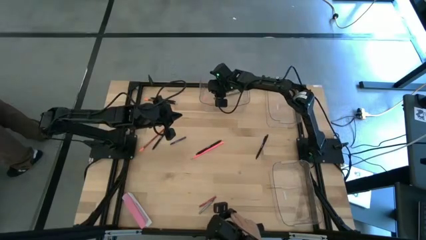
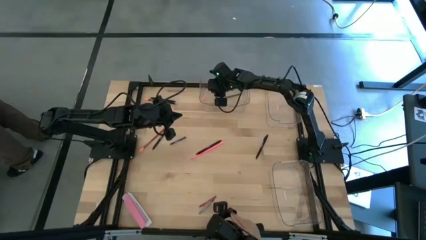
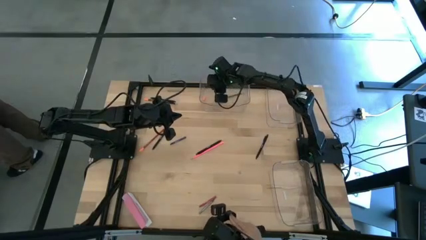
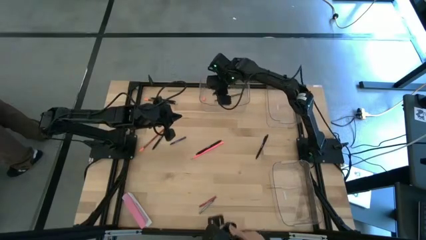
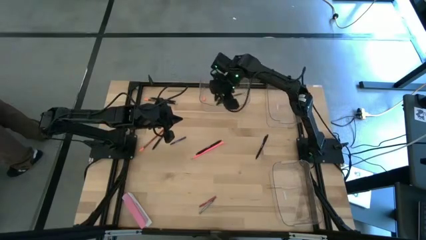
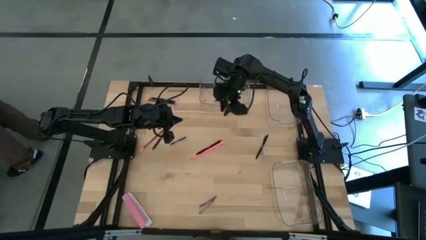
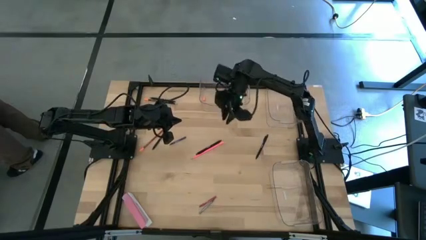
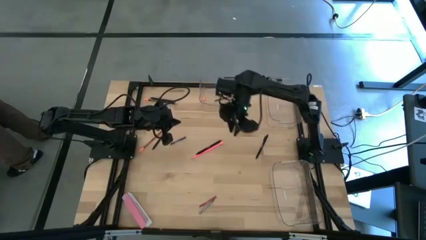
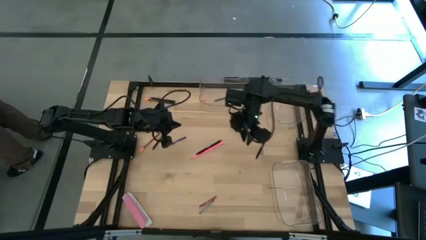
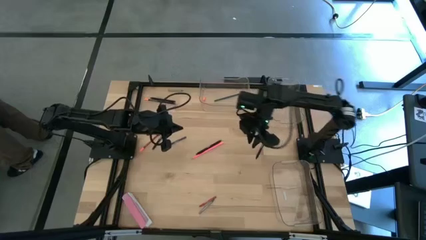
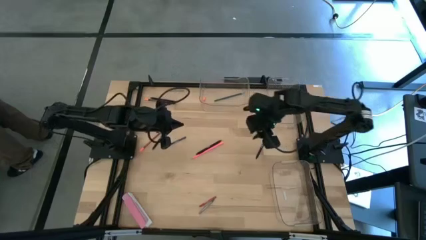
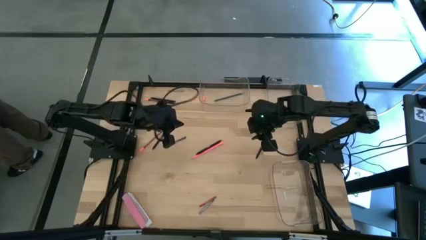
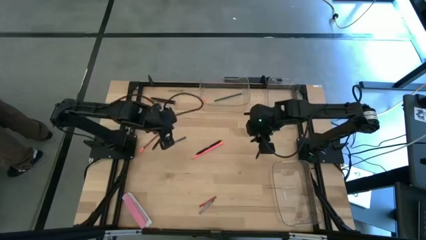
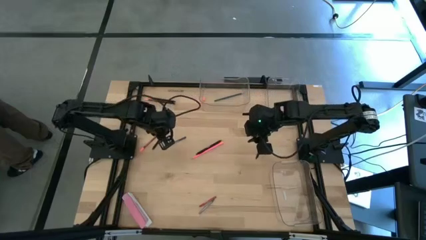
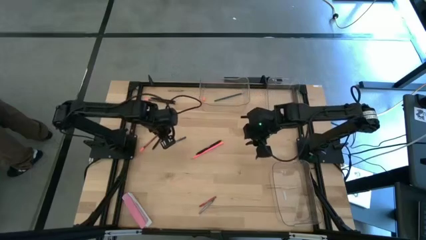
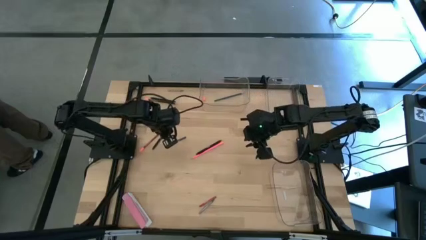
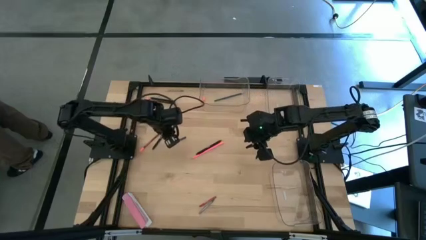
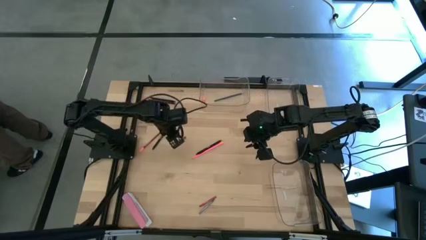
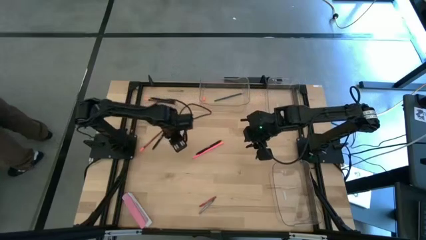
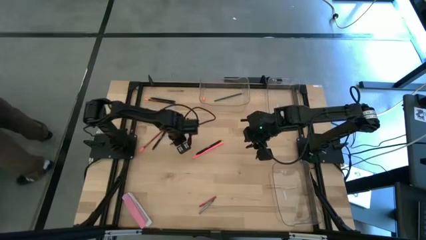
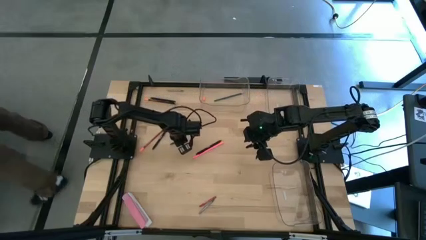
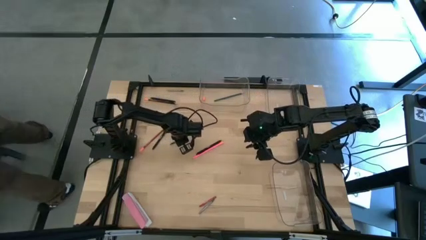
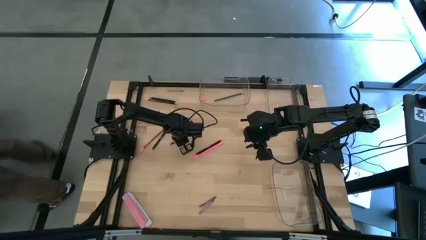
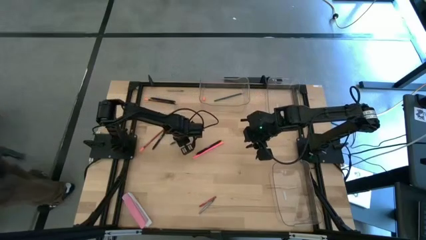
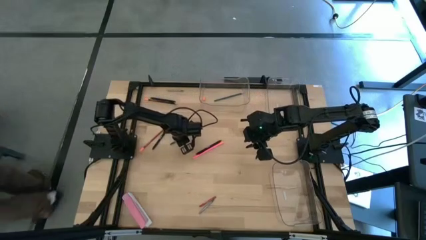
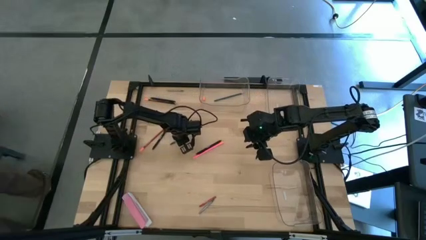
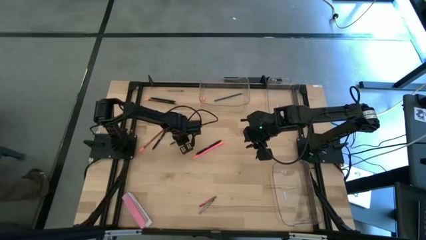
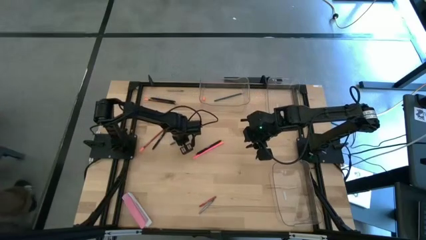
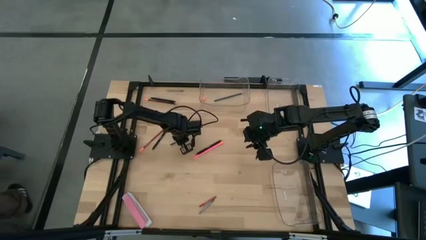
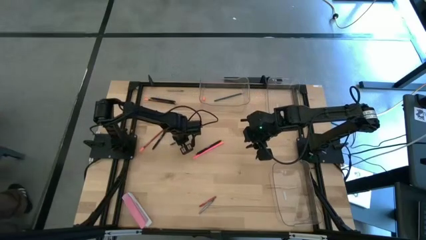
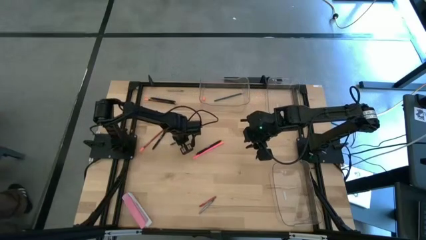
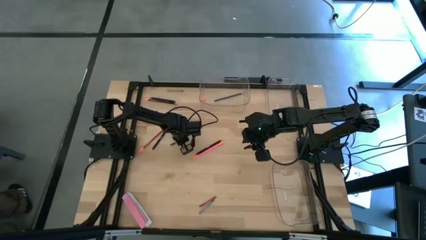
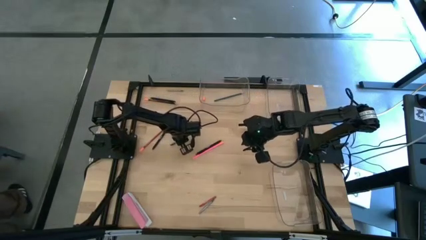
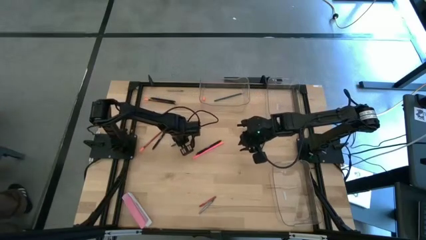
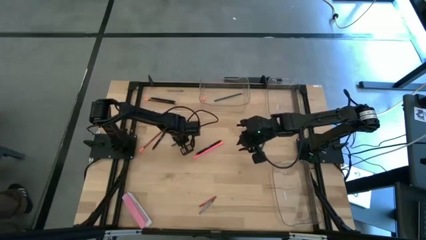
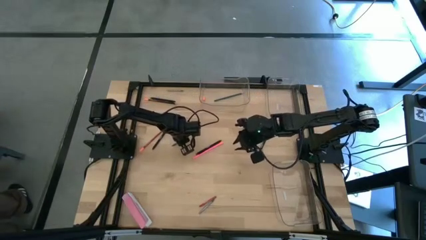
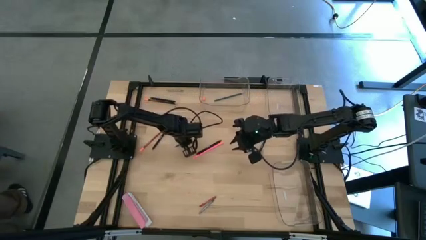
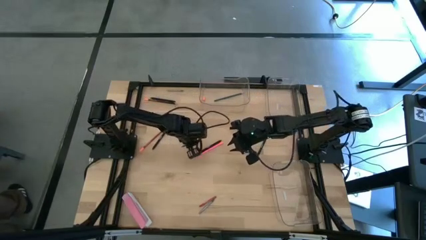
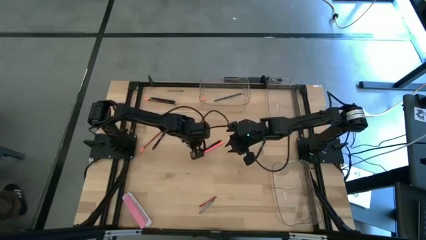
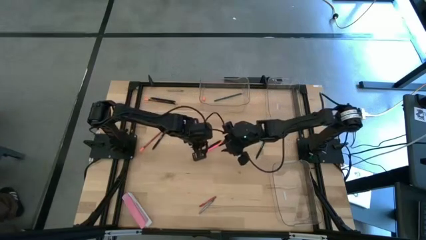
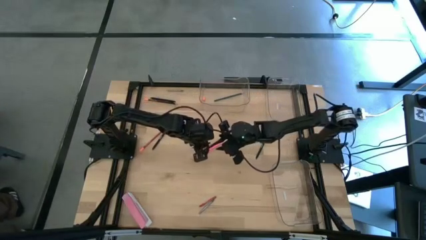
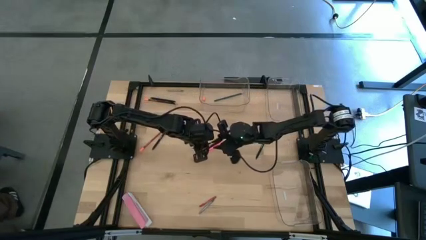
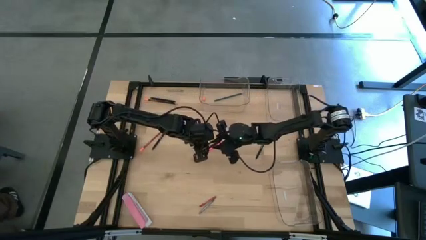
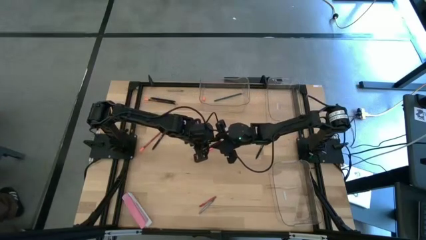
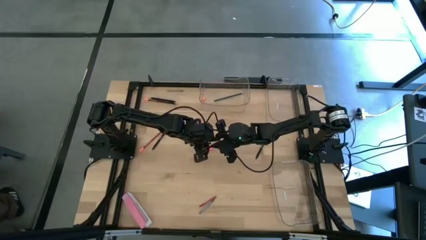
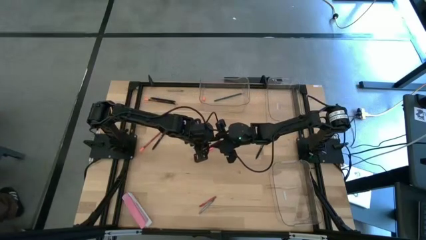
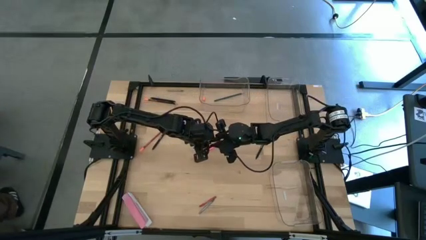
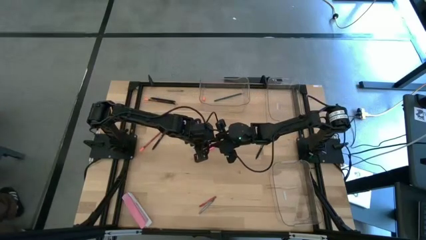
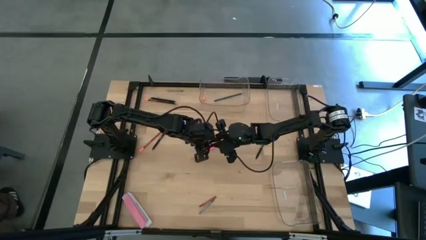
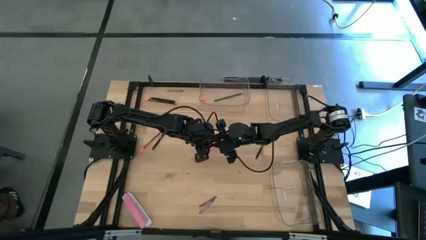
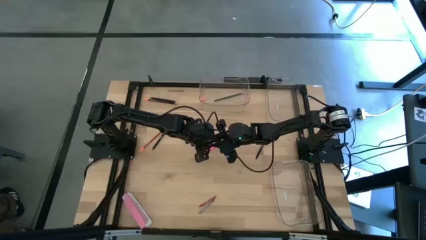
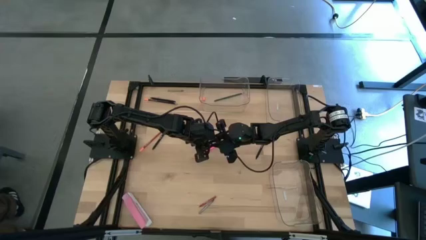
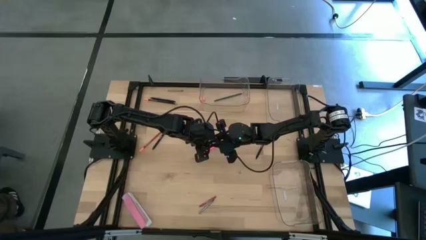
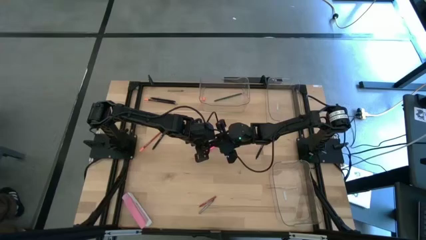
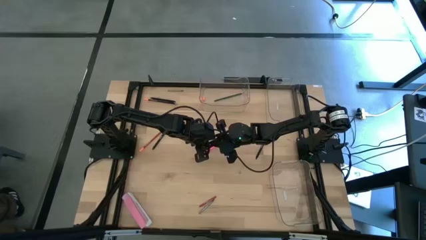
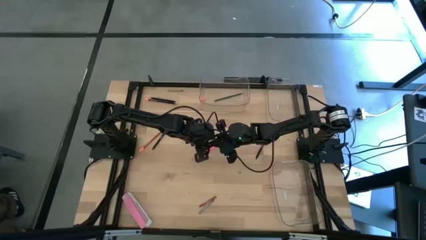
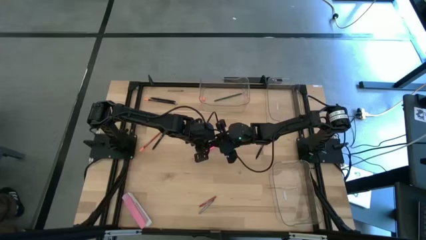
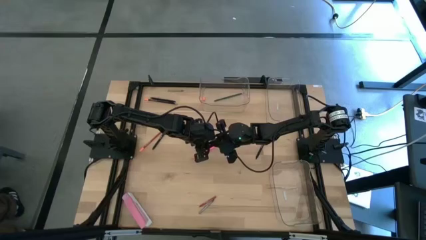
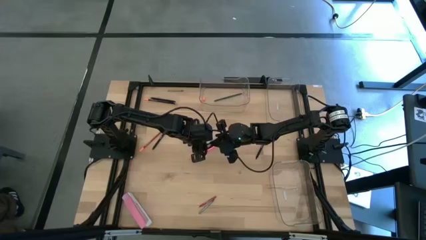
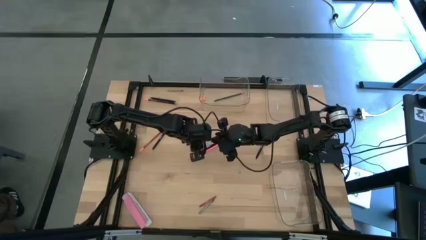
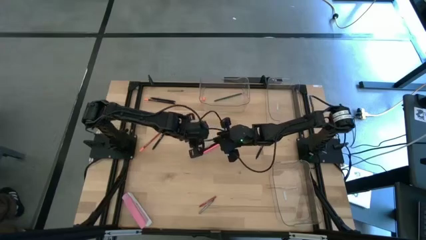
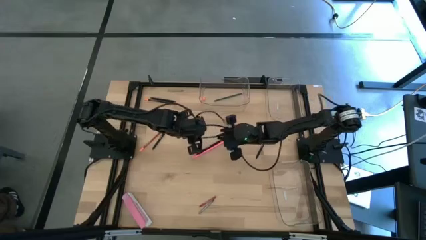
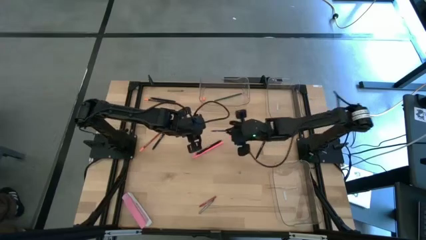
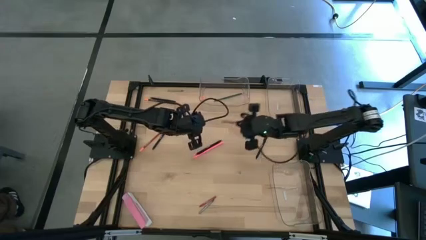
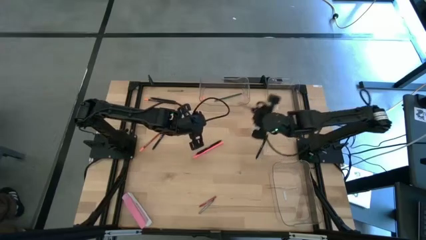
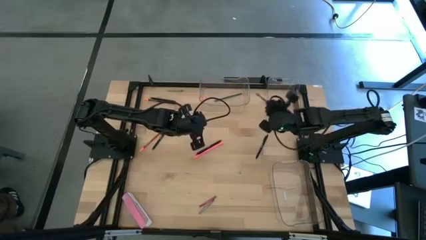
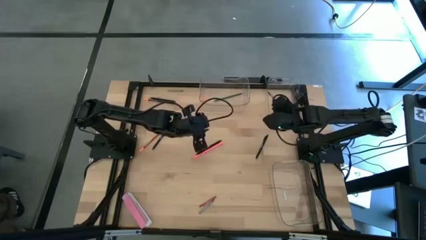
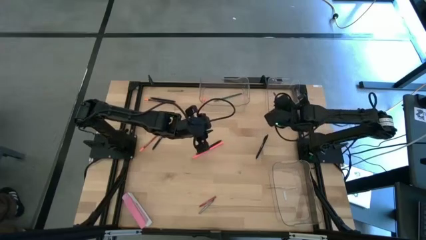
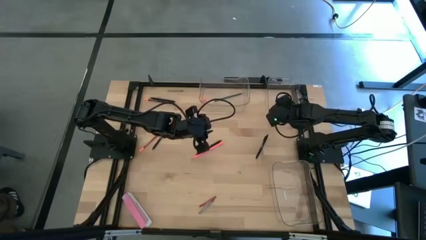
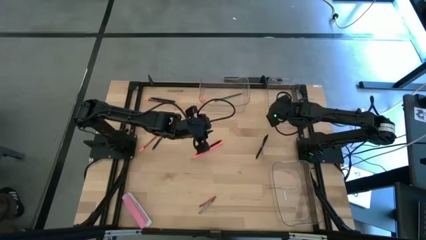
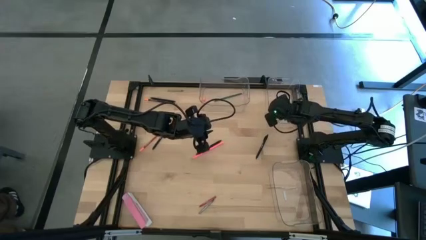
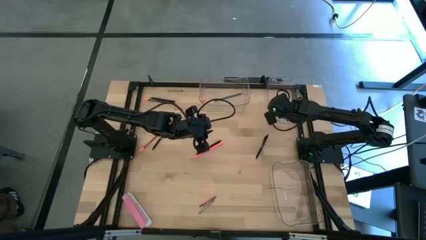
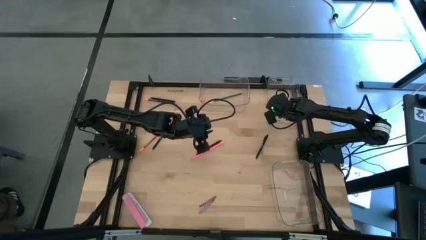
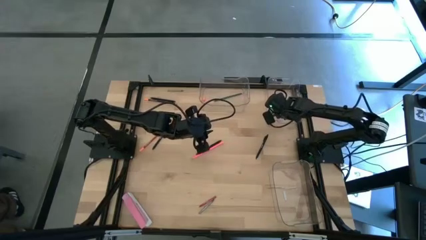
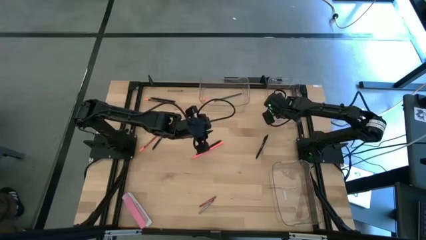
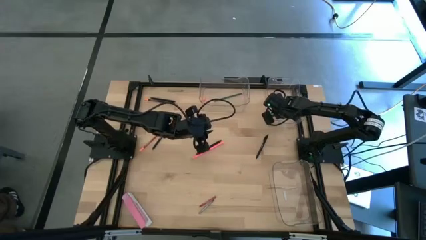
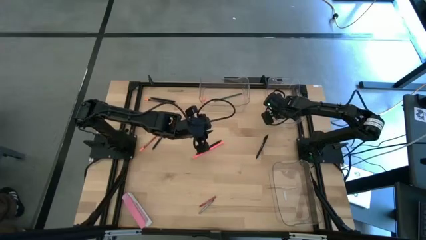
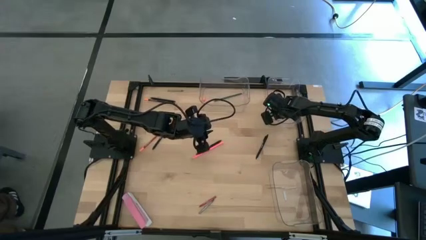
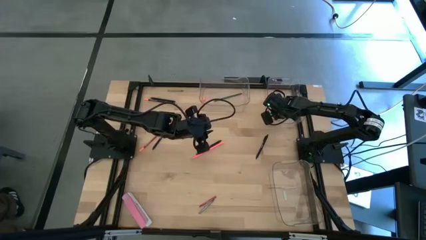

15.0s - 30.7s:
Task: Sort crayons/erasers/pens/pencils in bins
Put the blue crayon into the top right transparent bin
